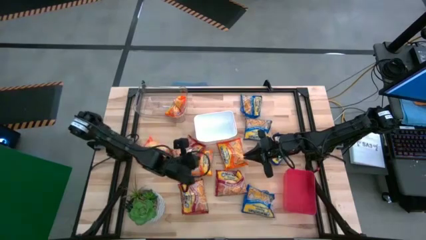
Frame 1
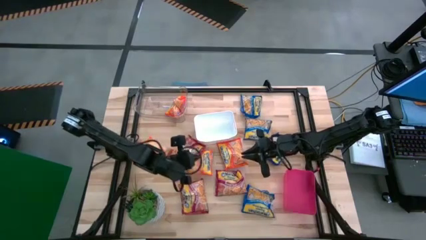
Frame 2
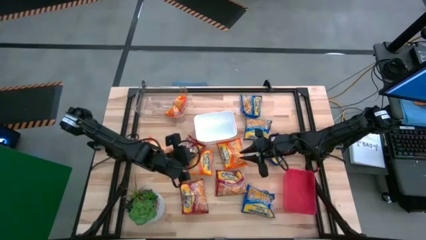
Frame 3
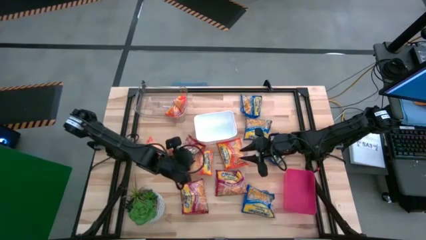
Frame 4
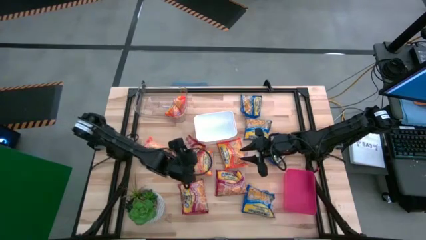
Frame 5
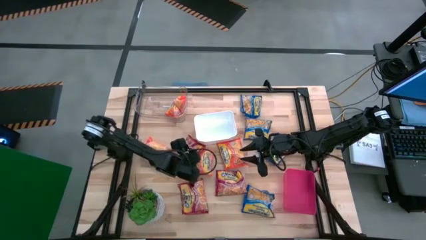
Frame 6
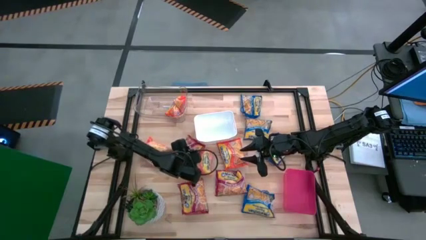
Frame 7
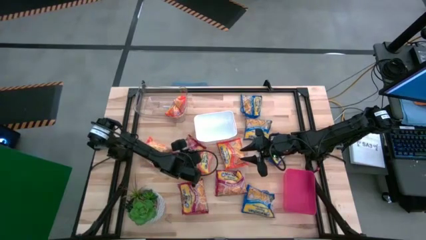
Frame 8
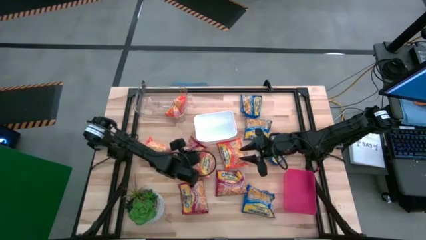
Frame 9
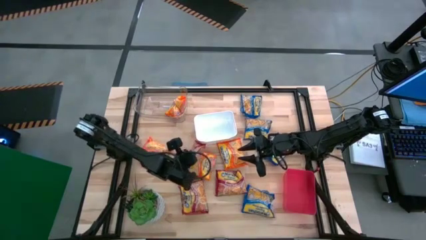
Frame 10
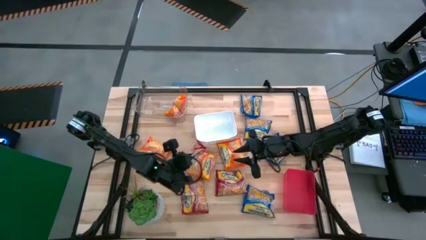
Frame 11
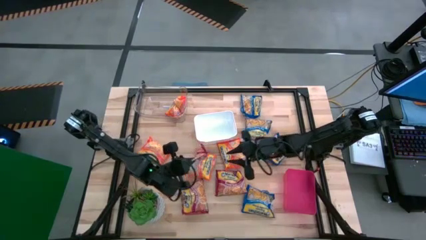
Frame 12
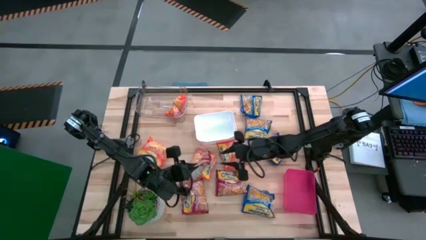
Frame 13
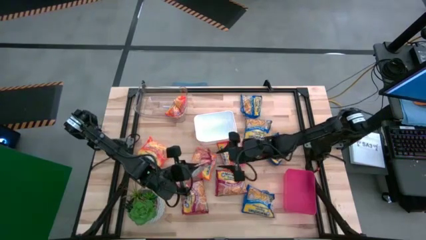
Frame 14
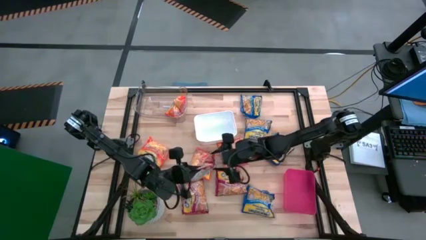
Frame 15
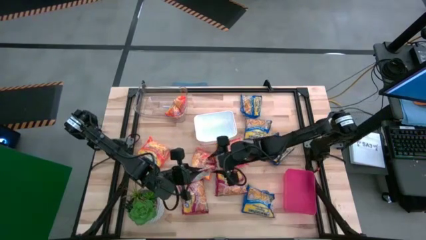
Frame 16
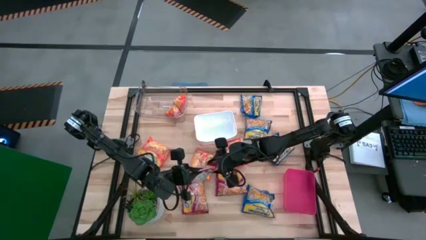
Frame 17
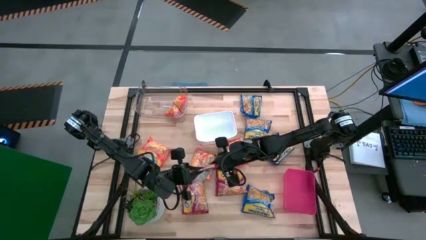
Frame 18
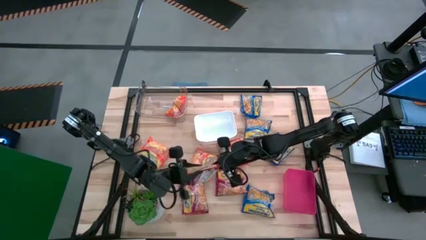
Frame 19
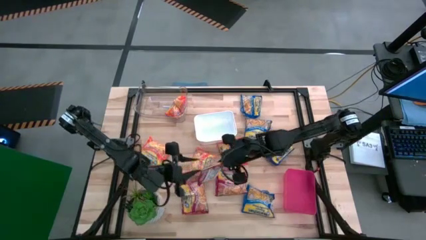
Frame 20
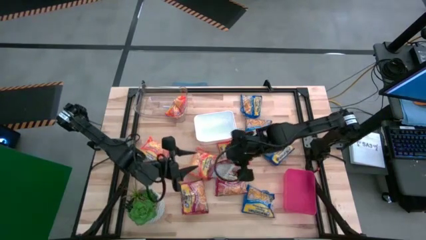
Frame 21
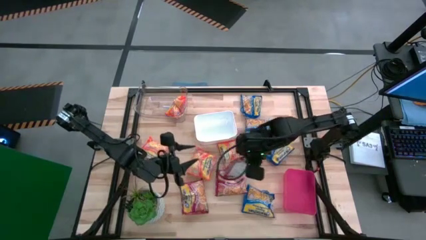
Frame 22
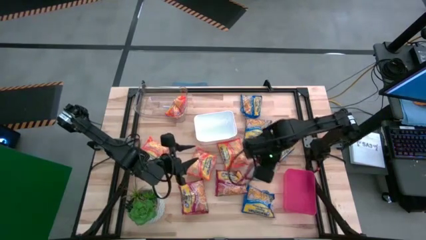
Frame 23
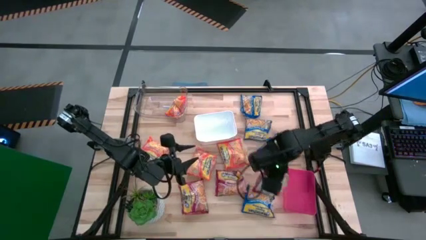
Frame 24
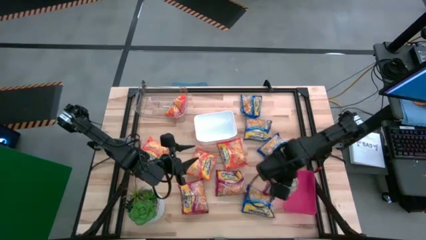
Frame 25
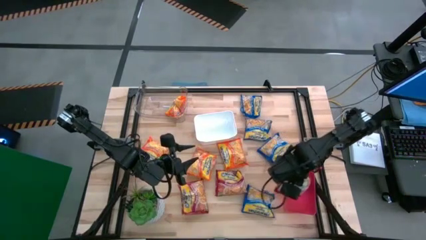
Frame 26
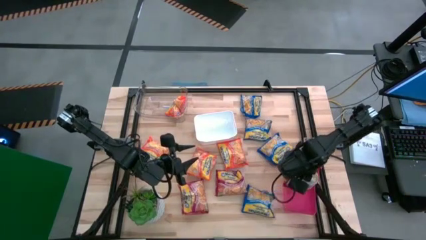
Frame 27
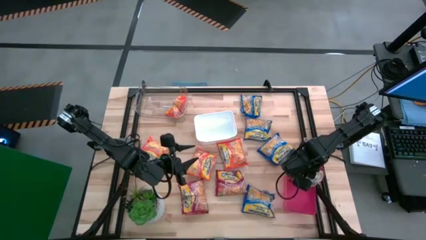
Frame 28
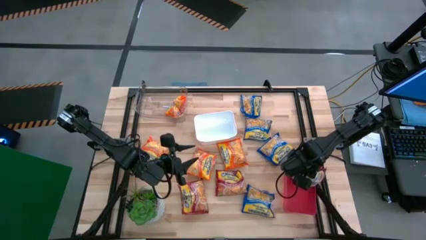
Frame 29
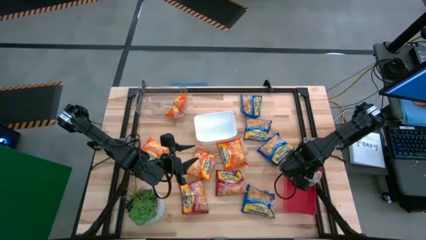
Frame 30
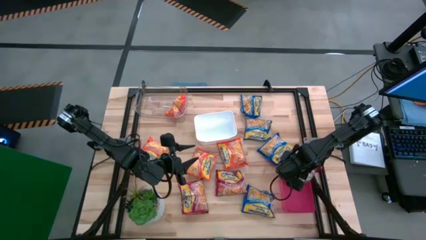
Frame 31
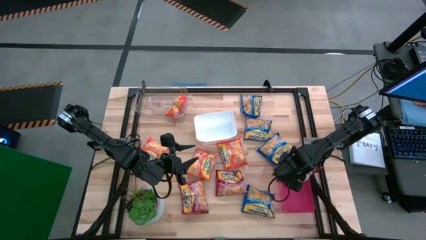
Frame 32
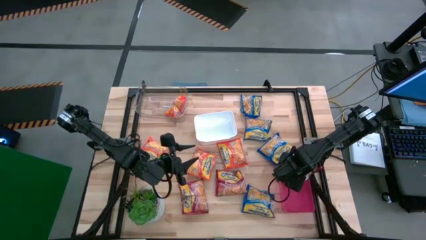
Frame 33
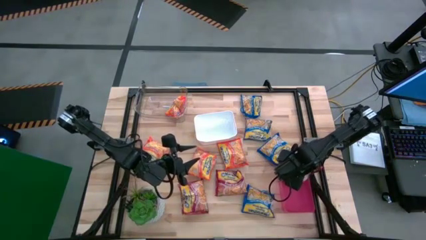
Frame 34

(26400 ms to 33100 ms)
Task: Sort Maruchan noodles
Put the red noodle pack into the pink bin

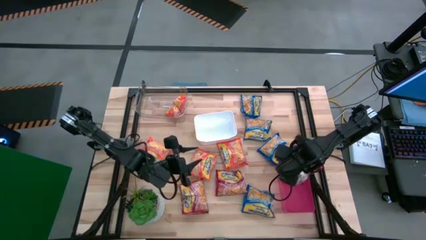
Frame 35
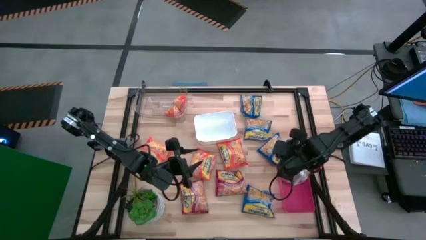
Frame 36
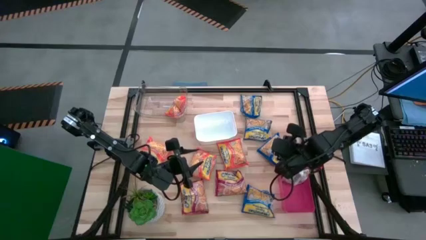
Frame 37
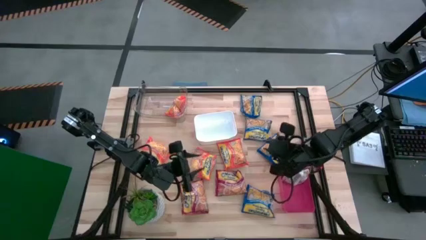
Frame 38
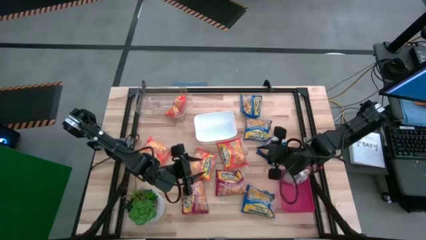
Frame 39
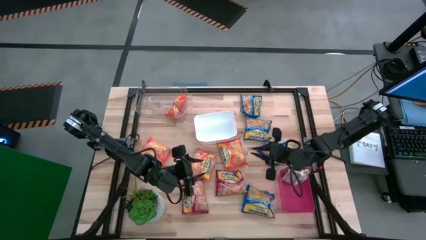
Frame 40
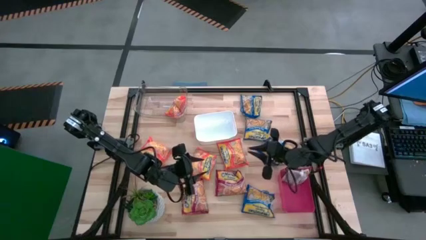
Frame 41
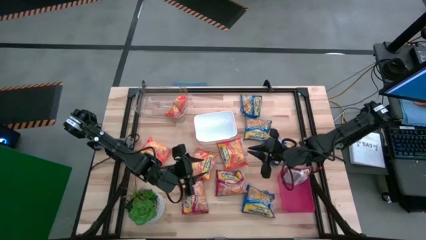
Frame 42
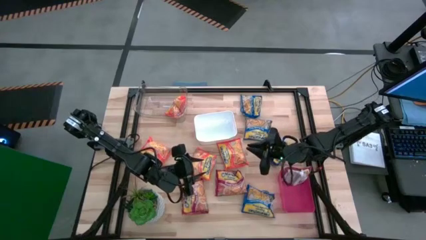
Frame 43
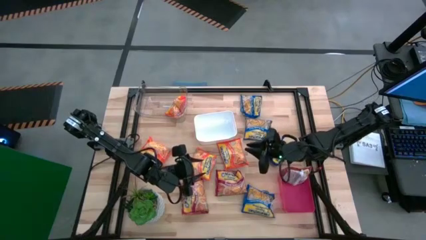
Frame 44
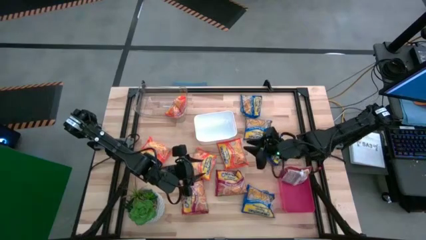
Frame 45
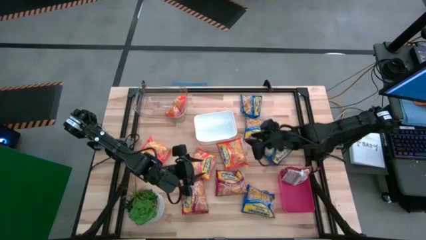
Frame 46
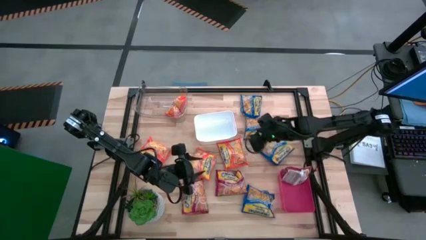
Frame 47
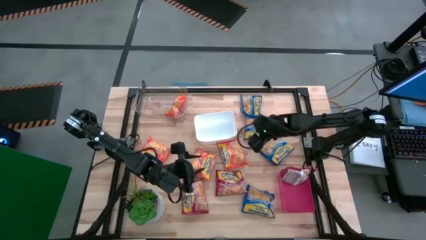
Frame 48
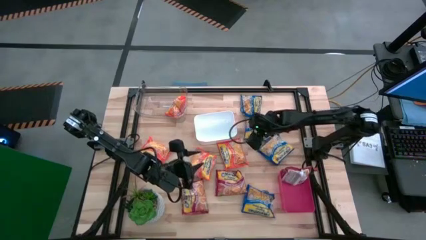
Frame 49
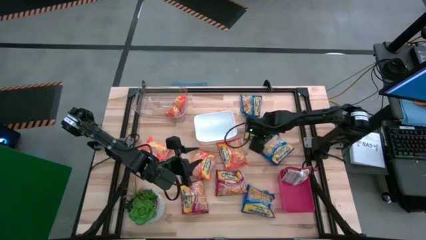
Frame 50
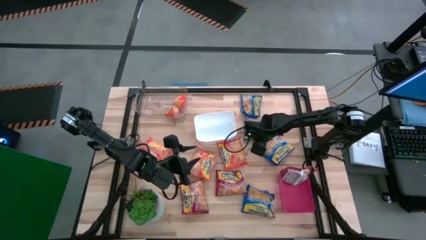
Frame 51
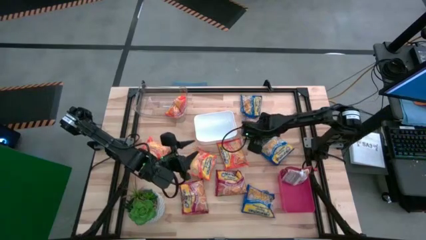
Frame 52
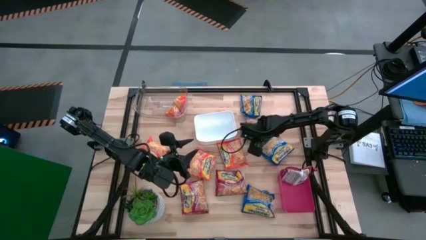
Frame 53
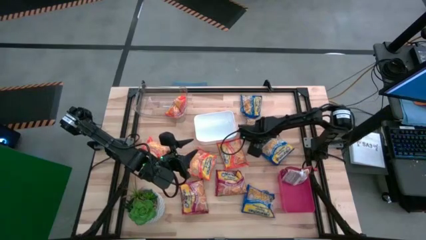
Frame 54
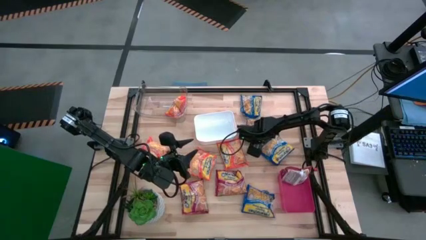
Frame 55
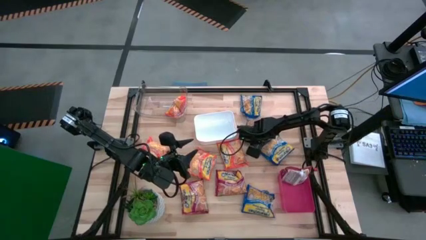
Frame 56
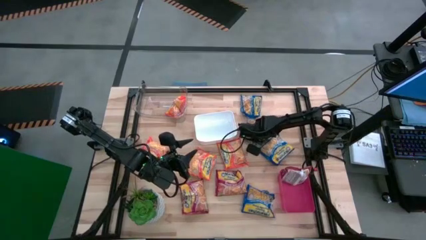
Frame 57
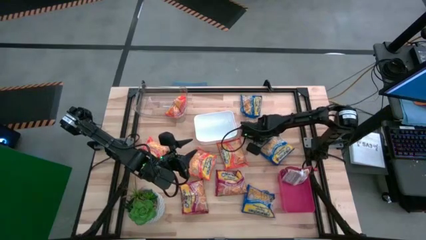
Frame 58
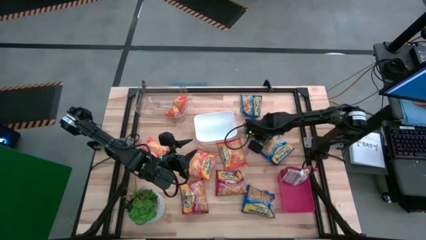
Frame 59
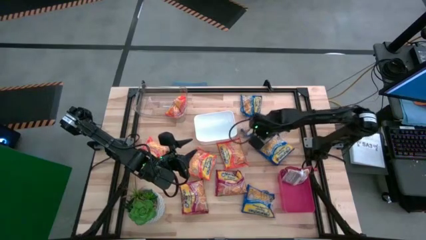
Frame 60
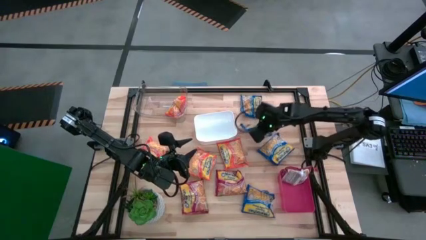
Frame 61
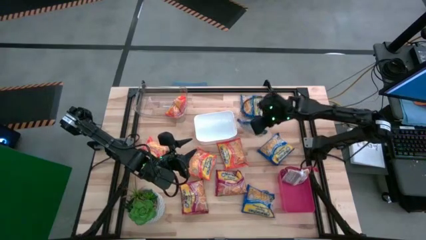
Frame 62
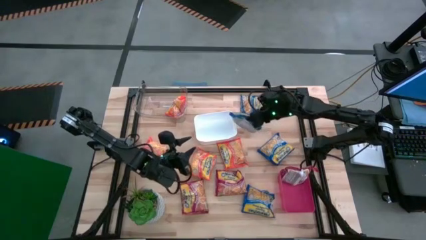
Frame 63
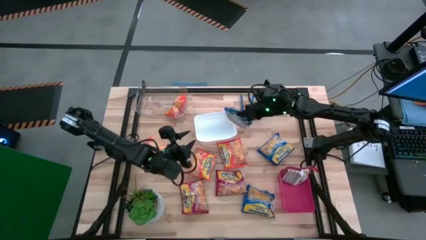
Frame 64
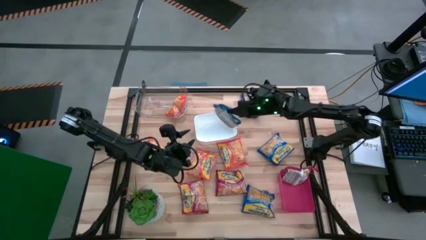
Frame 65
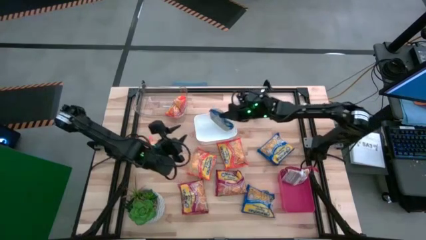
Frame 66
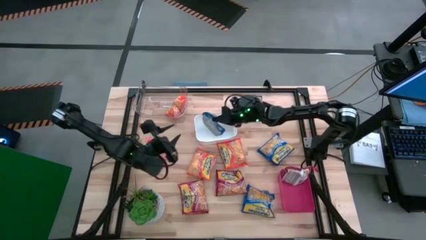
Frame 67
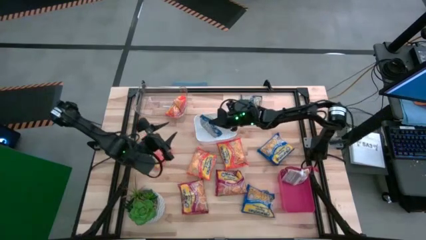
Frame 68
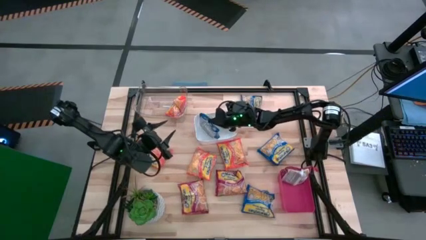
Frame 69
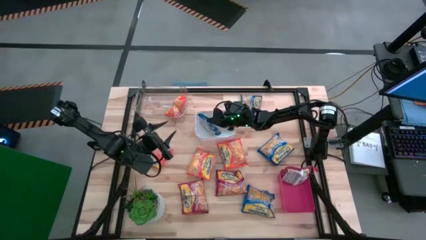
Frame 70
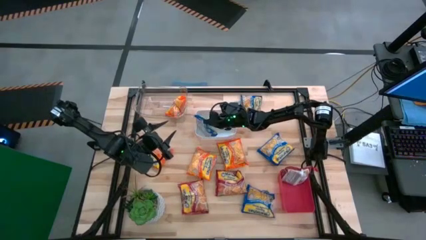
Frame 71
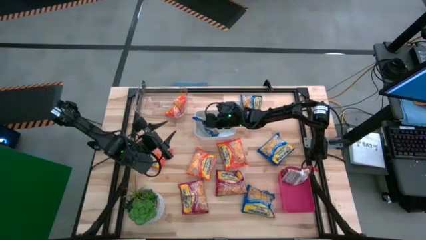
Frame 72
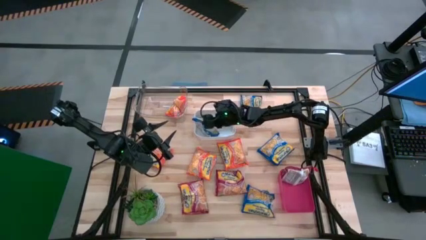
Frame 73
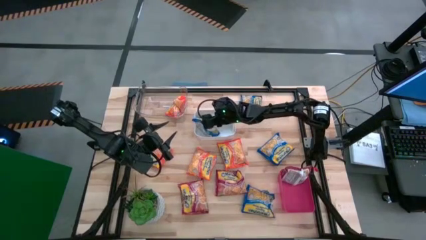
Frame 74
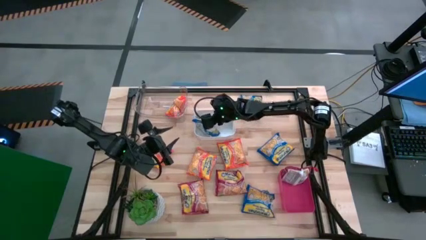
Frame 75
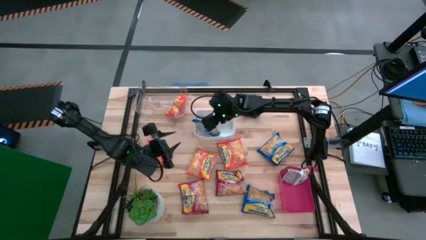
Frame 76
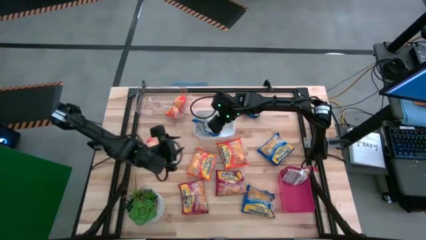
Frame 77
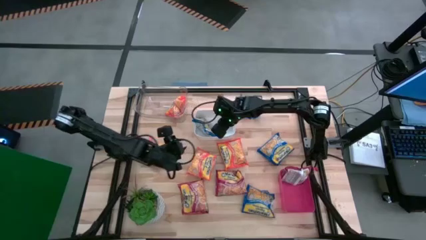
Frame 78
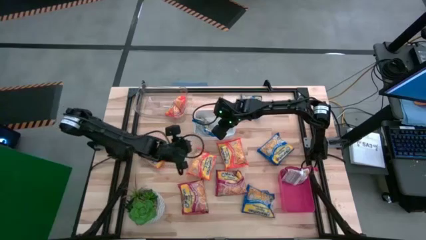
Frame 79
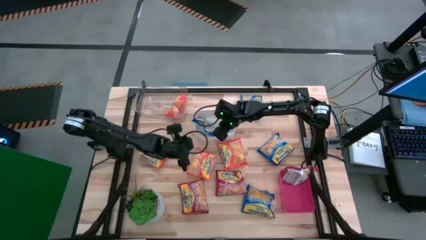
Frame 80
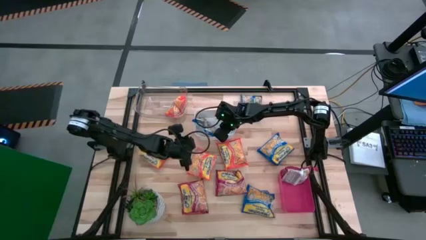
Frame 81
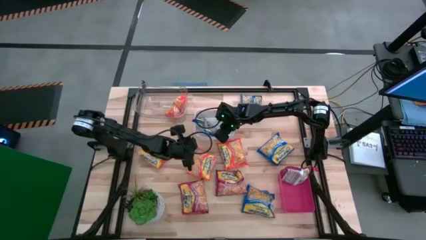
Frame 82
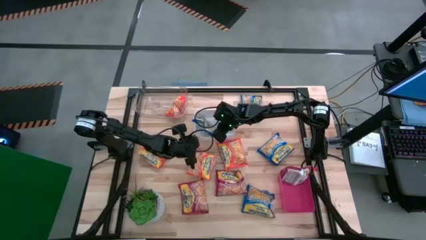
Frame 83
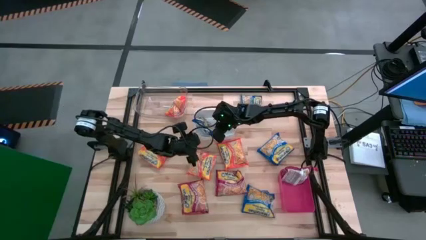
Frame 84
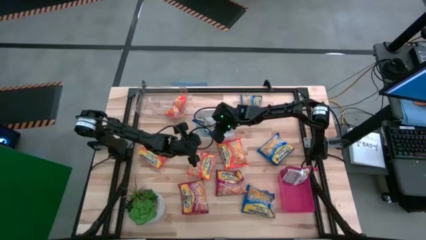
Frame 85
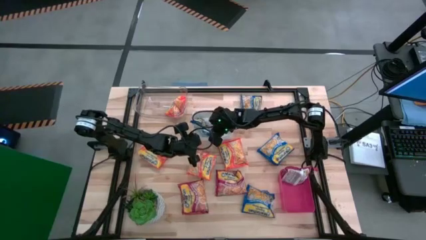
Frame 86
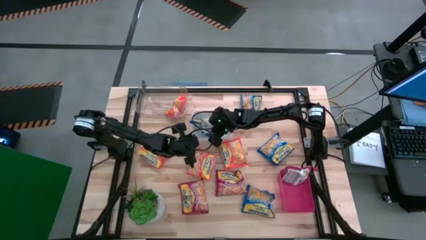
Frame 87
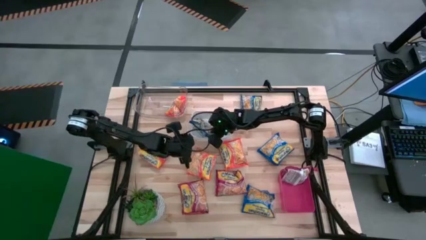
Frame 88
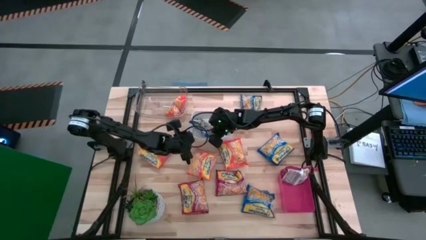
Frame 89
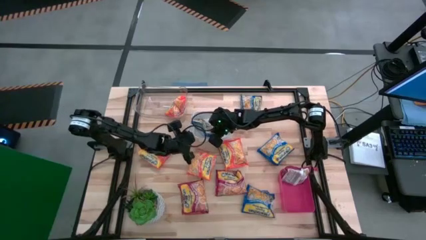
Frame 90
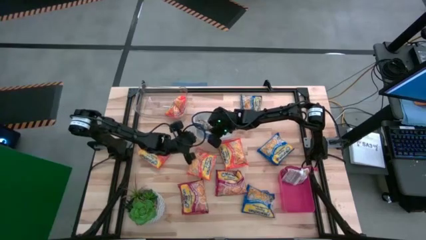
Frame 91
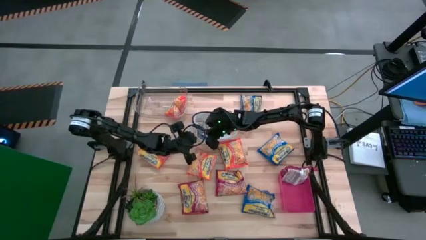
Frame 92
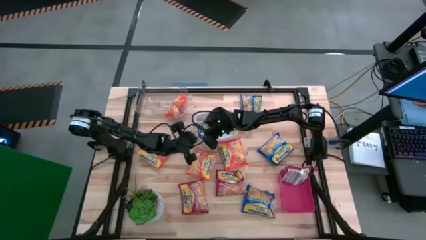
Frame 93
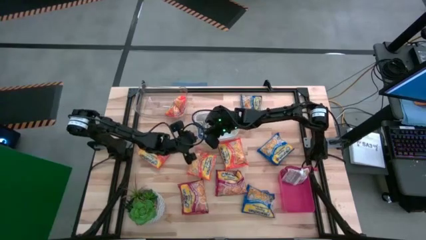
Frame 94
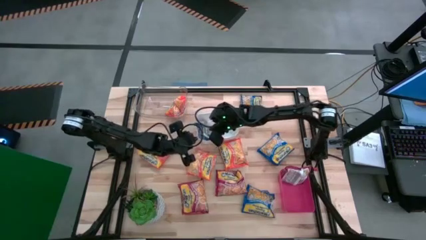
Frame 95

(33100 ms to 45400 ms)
Put the blue noodle pack into the white bin
